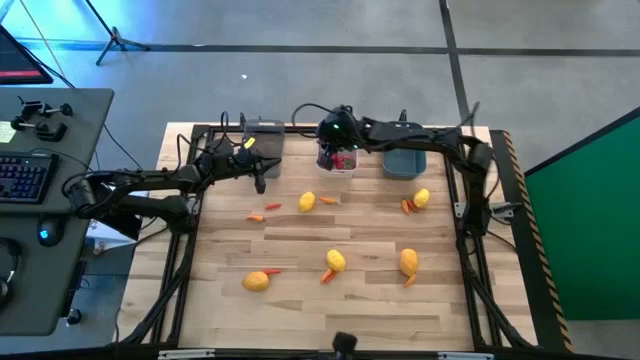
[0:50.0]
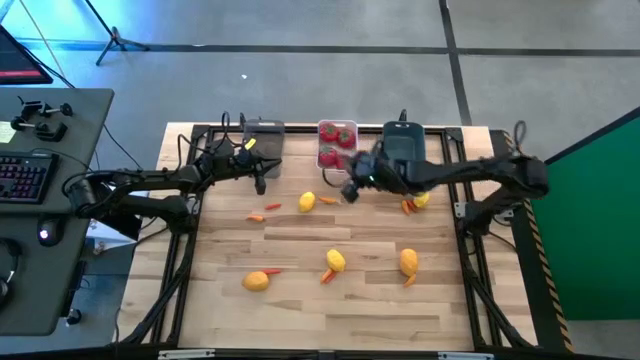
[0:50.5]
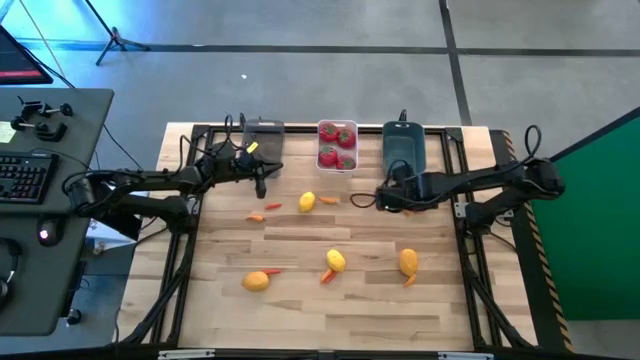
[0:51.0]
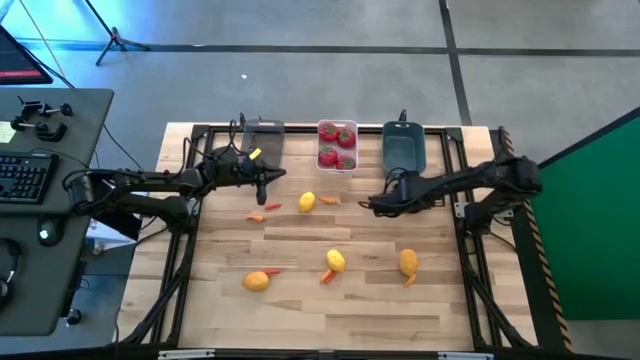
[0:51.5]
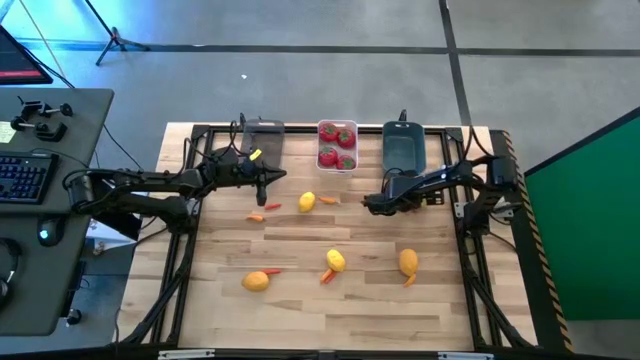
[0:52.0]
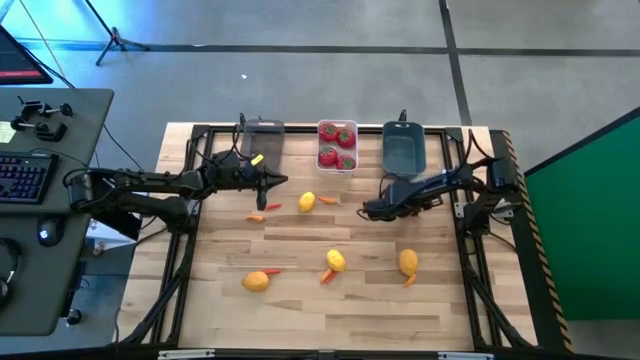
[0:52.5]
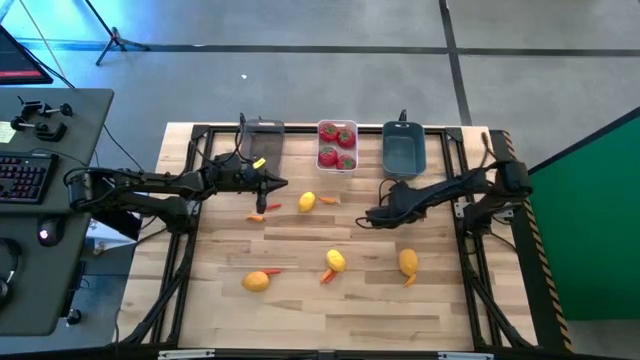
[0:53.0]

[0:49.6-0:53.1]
Task: Sort produce into baskets
Put the yellow lemon into the blue bin

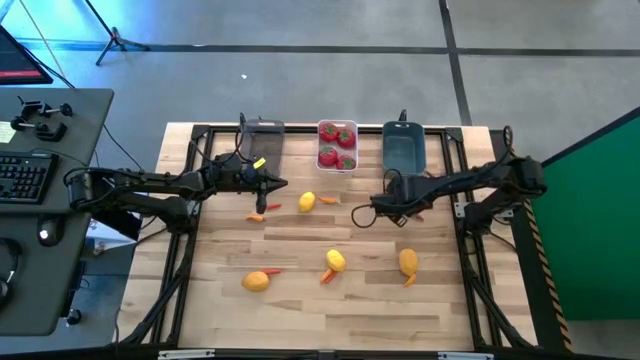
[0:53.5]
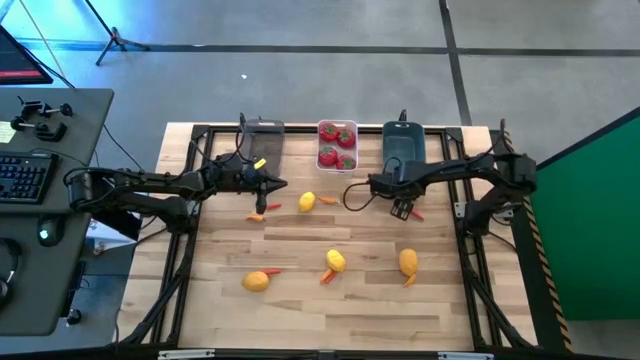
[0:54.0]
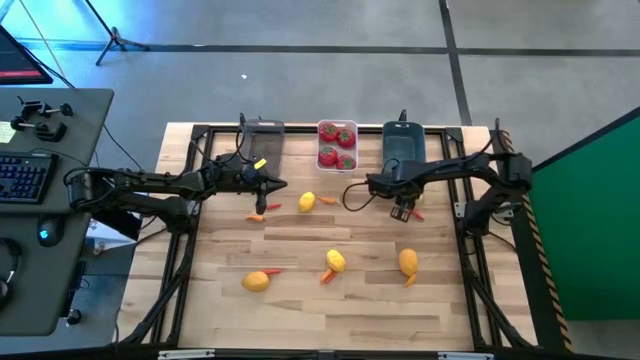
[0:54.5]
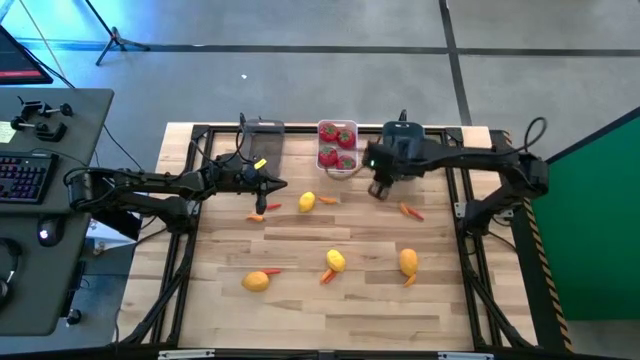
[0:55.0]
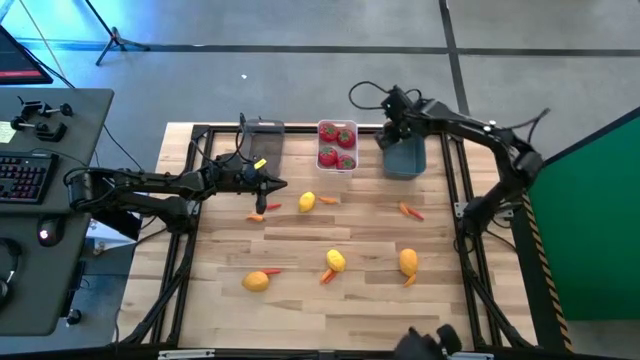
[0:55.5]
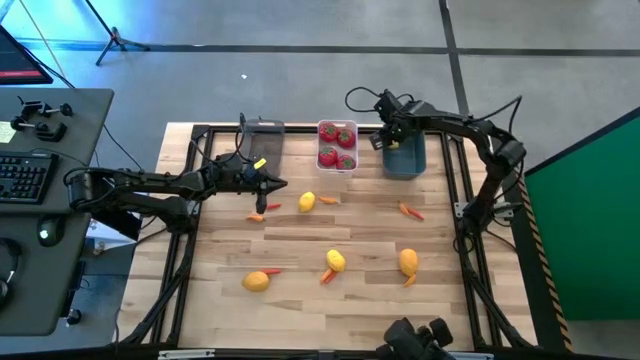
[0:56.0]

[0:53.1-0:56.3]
Put the yellow lemon into the blue bin

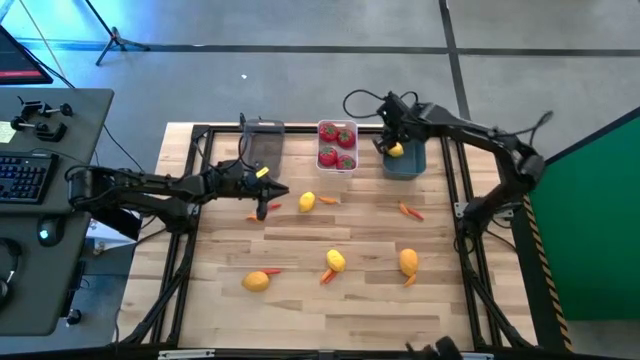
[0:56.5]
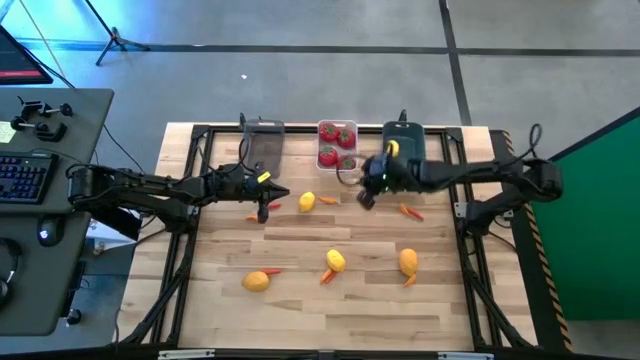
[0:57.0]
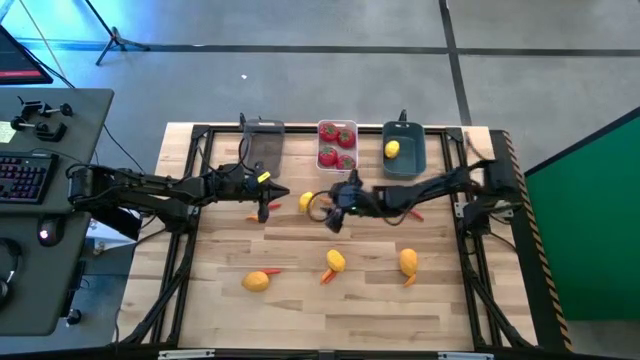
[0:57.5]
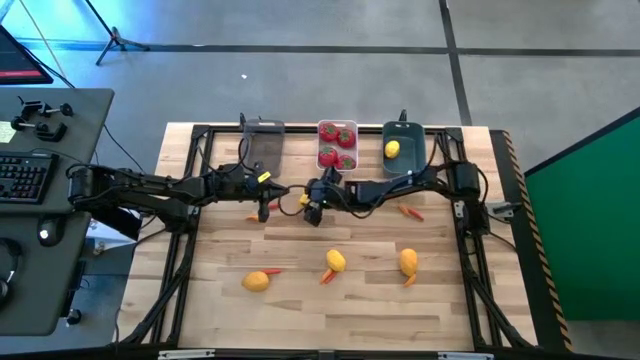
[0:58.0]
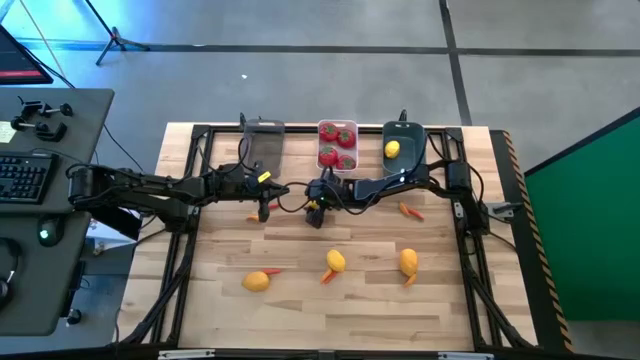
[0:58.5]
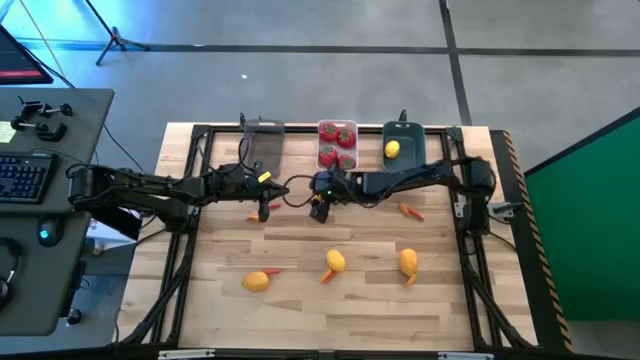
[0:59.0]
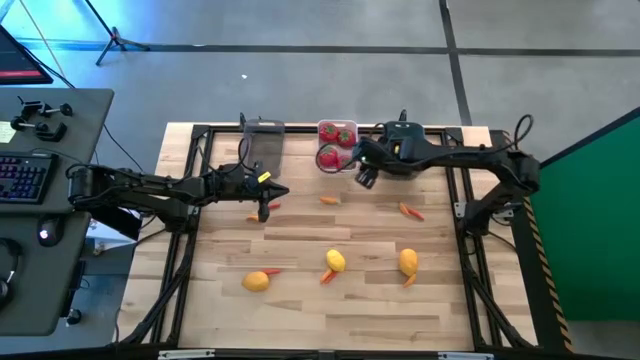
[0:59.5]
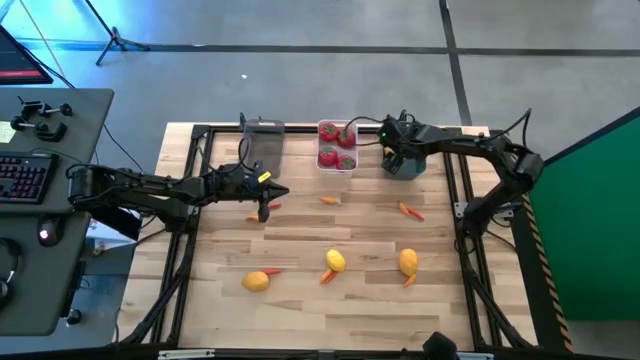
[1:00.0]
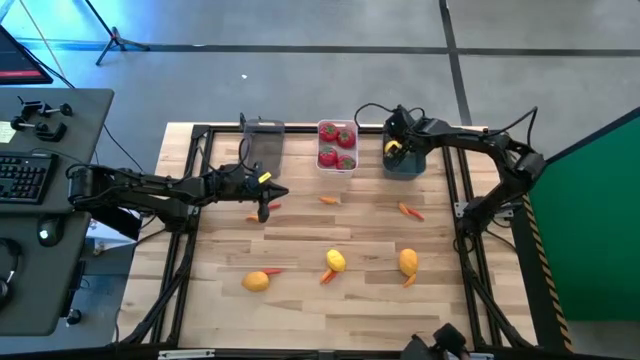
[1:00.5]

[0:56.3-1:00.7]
Put the yellow lemon into the blue bin

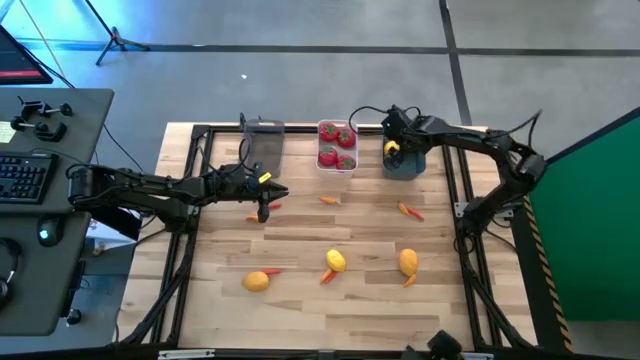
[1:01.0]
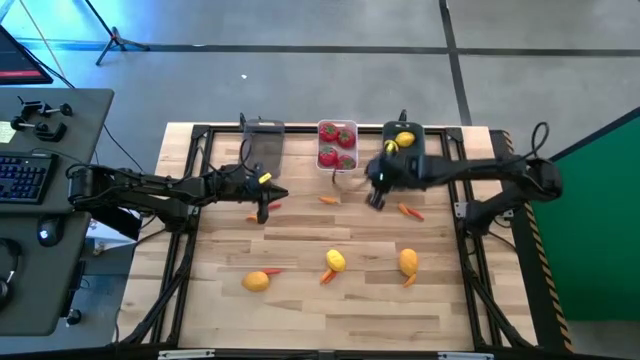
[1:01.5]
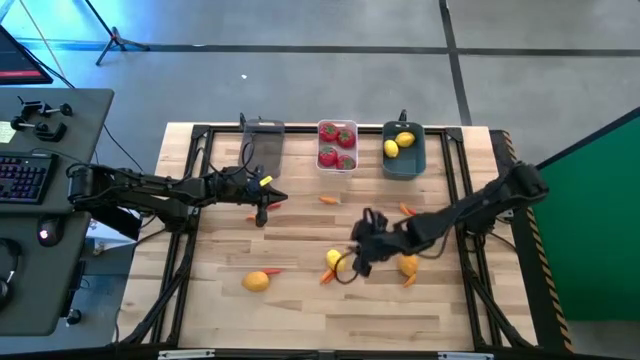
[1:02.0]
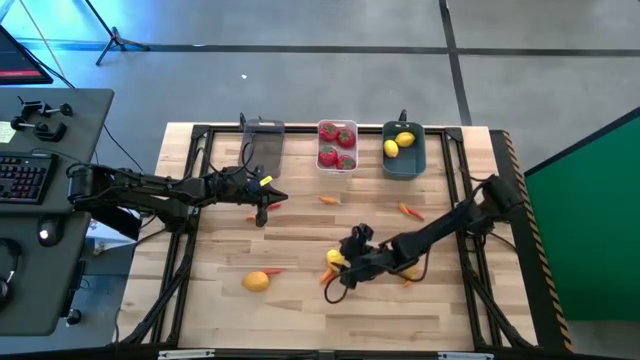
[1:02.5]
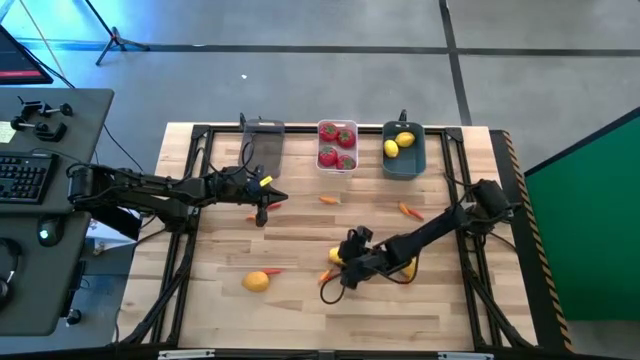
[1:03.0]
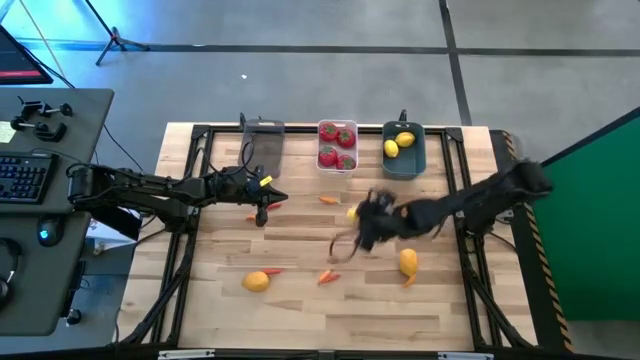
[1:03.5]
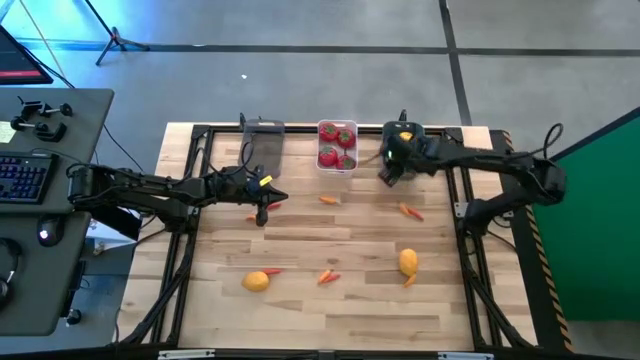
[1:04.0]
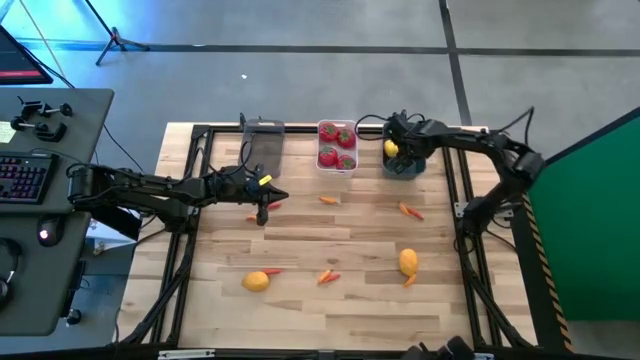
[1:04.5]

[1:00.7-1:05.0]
Put the yellow lemon into the blue bin

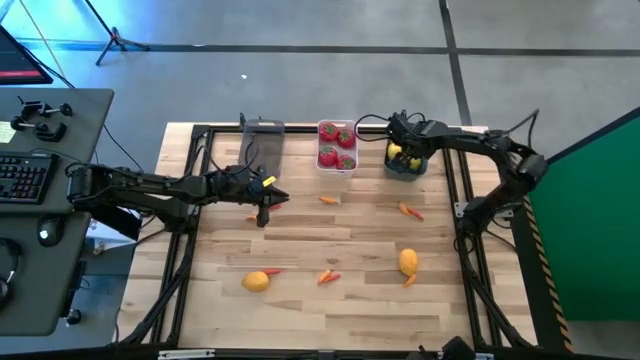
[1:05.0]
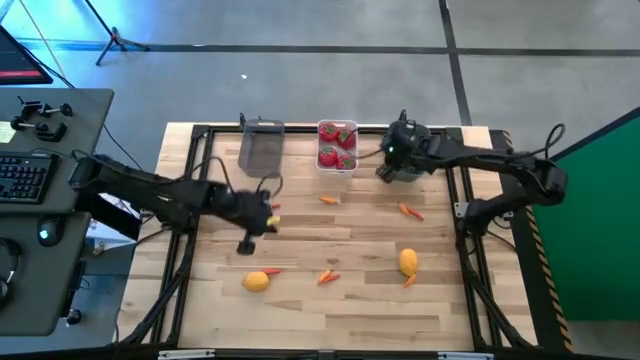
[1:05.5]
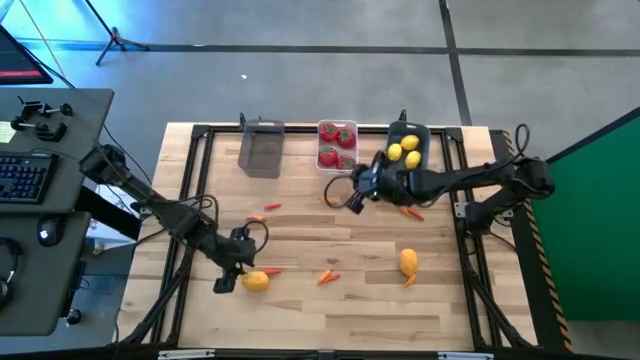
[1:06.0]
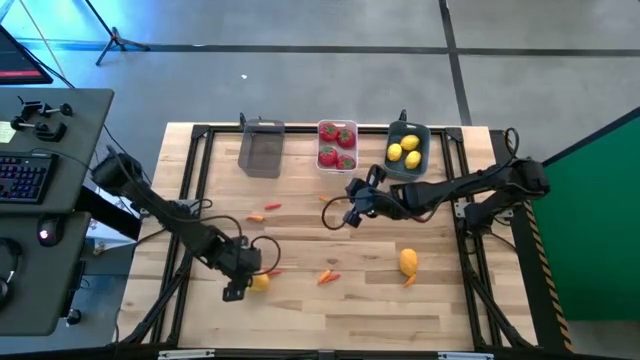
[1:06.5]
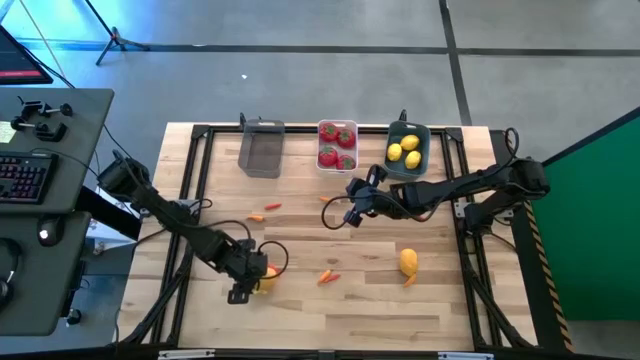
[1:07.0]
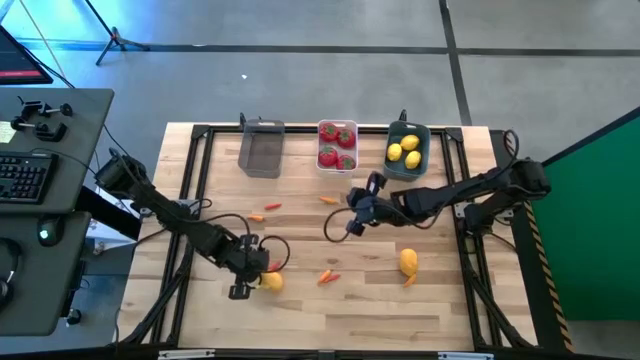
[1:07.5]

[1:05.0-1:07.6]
Put the yellow lemon into the blue bin

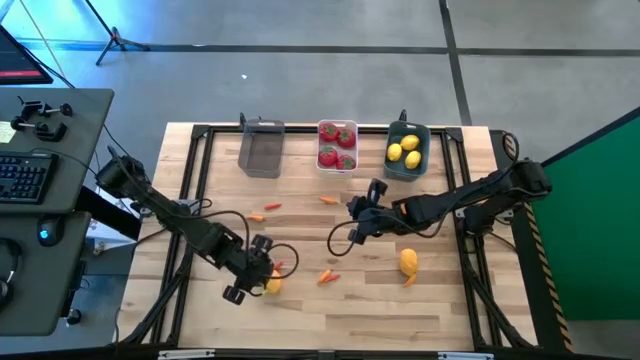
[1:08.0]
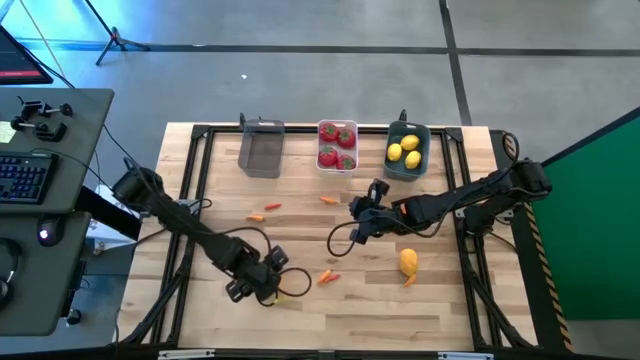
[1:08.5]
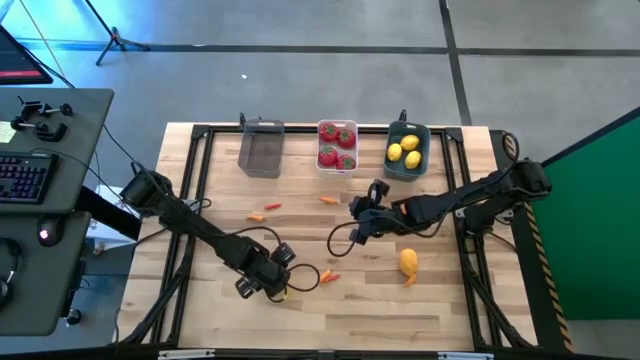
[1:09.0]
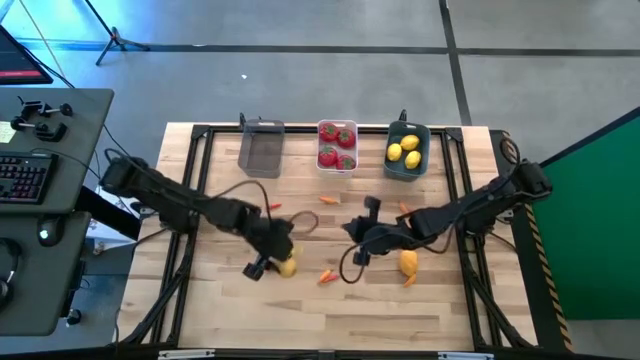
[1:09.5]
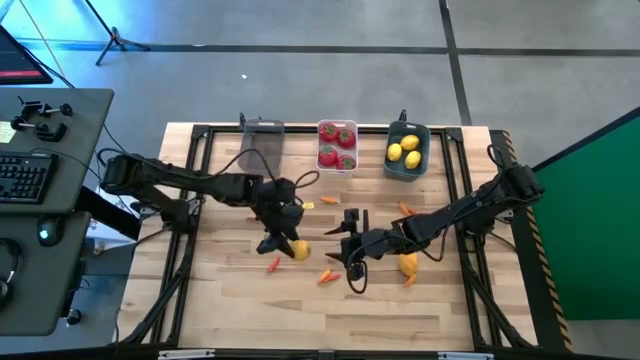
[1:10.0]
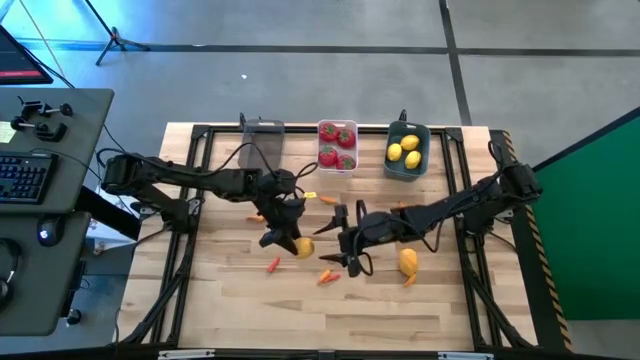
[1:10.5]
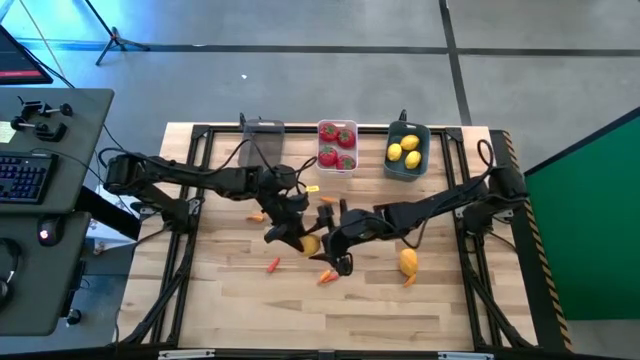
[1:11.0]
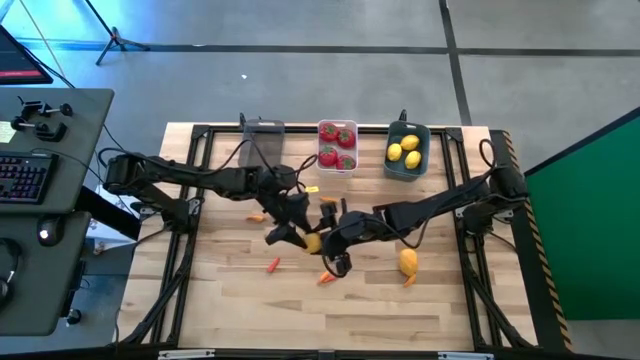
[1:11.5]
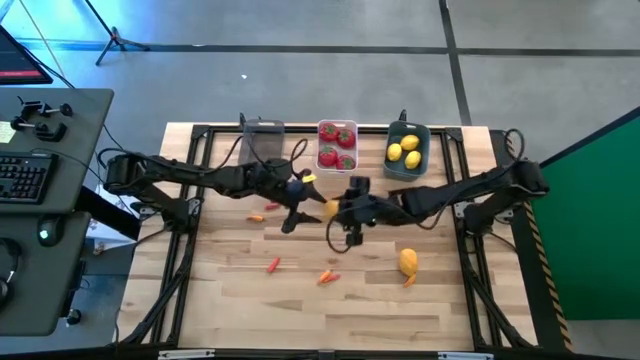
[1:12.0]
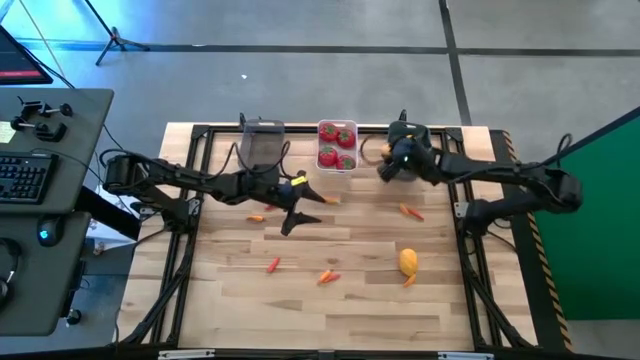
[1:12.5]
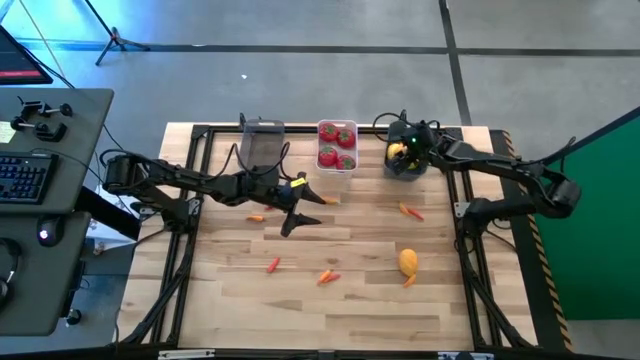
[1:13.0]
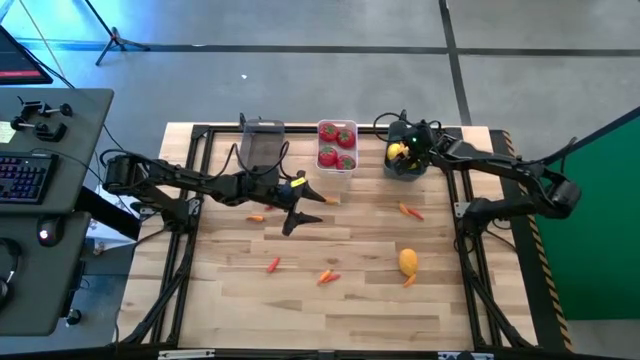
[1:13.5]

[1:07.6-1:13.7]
Put the yellow lemon into the blue bin
